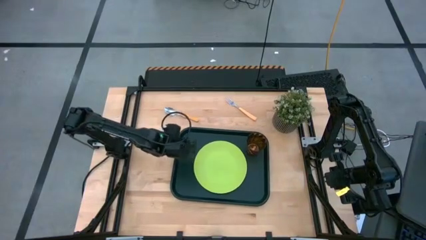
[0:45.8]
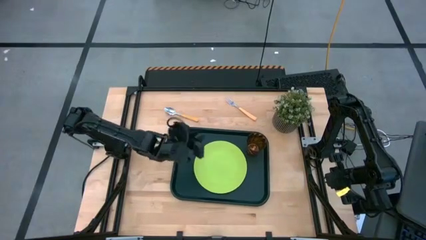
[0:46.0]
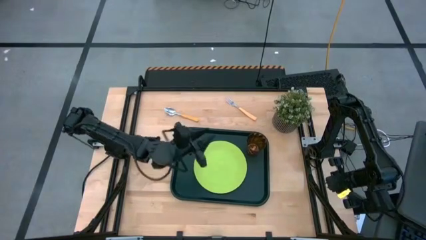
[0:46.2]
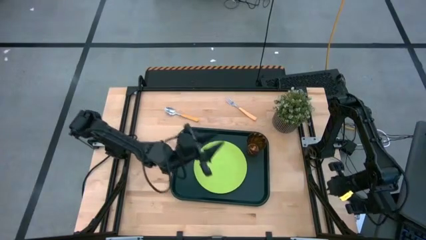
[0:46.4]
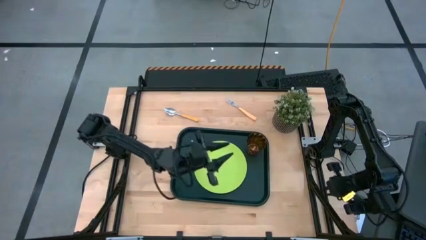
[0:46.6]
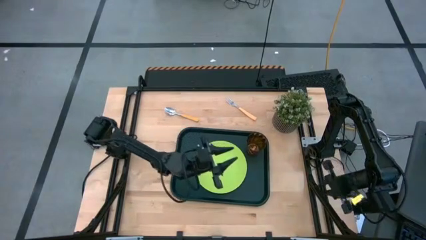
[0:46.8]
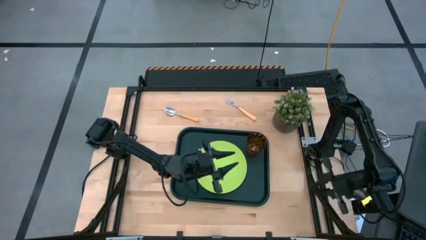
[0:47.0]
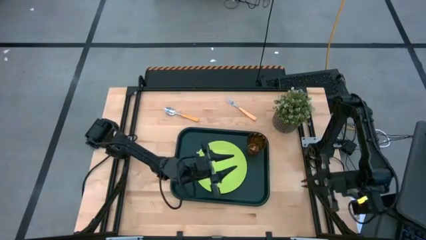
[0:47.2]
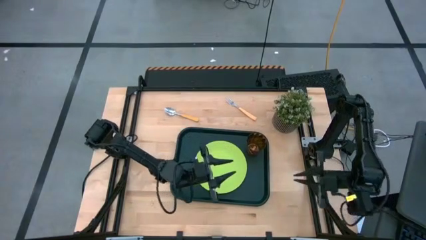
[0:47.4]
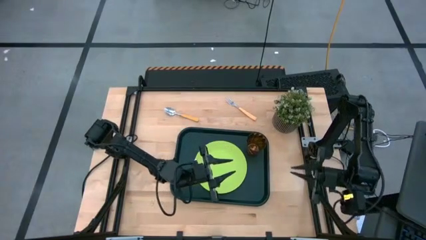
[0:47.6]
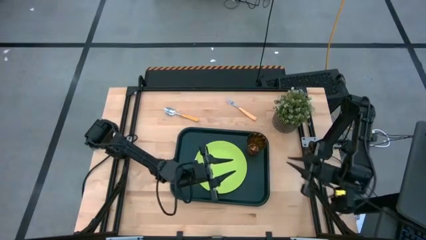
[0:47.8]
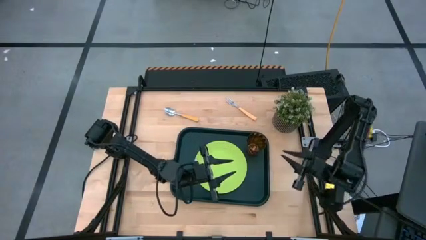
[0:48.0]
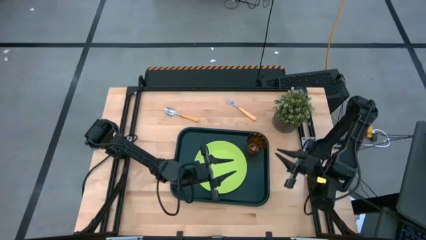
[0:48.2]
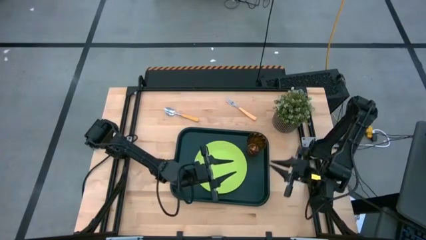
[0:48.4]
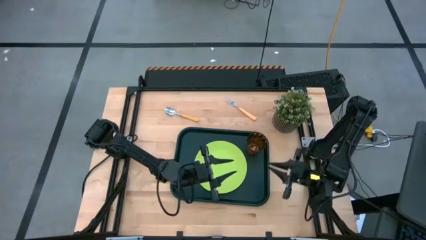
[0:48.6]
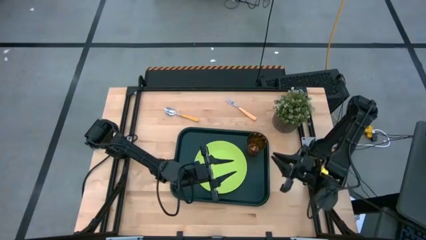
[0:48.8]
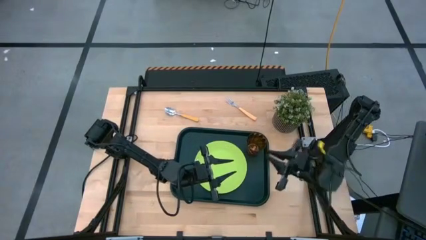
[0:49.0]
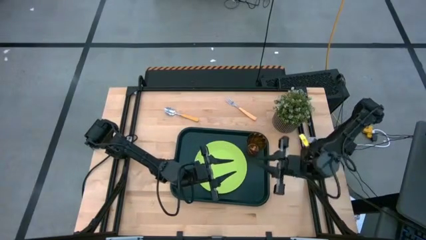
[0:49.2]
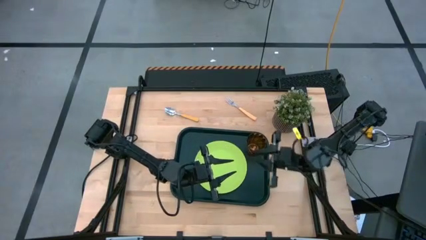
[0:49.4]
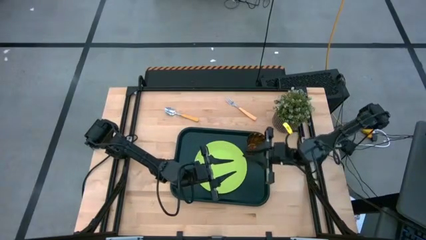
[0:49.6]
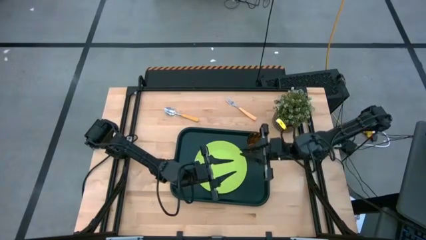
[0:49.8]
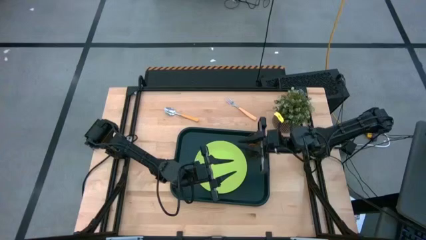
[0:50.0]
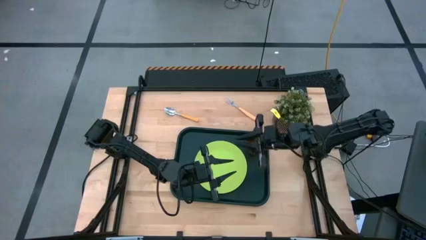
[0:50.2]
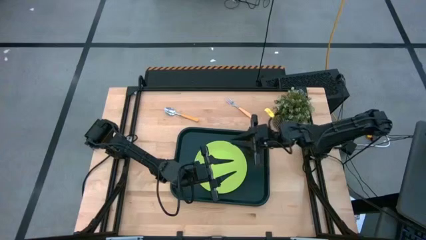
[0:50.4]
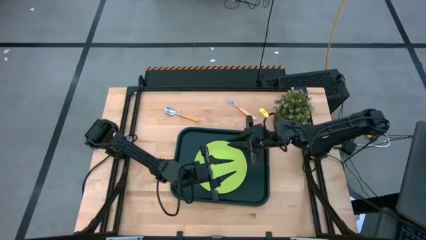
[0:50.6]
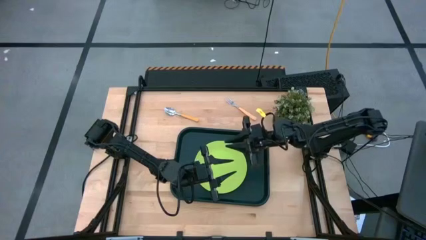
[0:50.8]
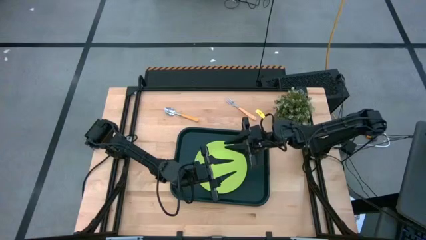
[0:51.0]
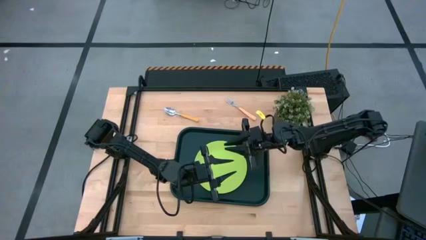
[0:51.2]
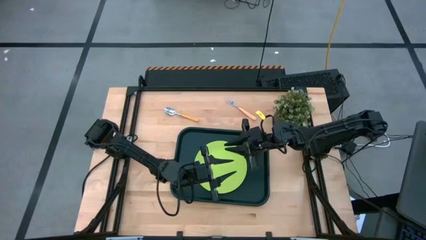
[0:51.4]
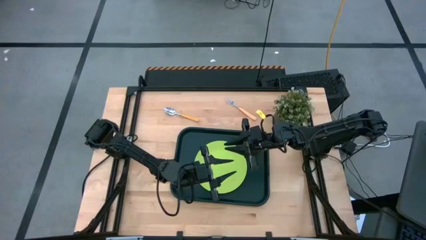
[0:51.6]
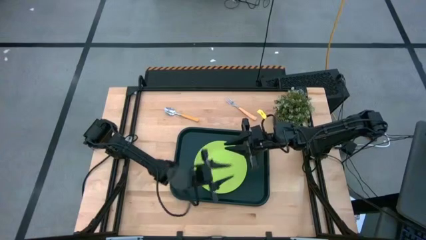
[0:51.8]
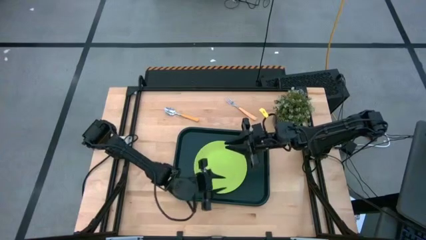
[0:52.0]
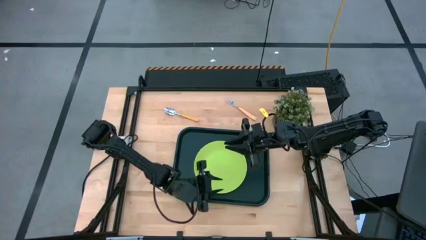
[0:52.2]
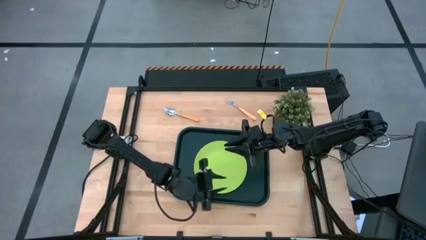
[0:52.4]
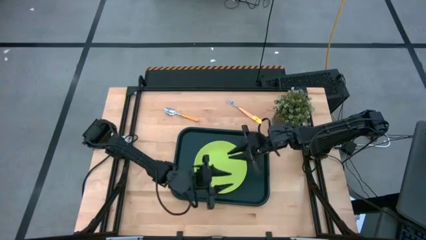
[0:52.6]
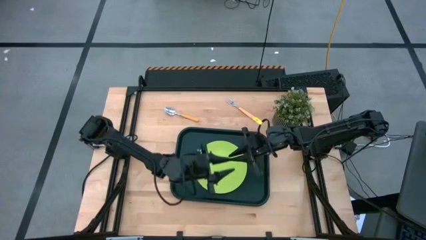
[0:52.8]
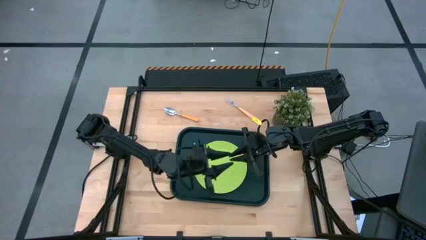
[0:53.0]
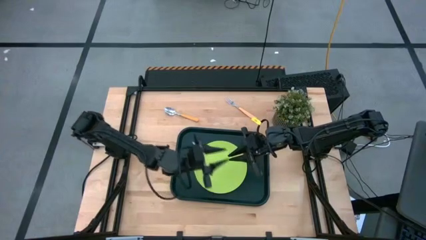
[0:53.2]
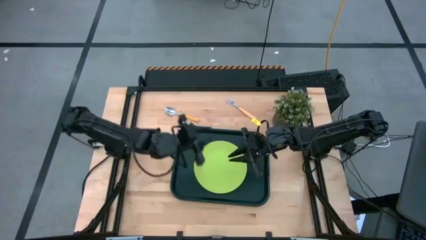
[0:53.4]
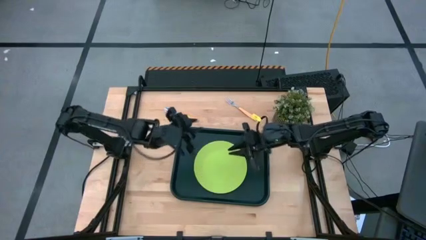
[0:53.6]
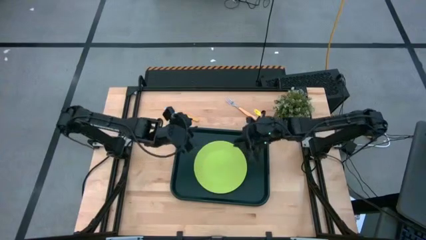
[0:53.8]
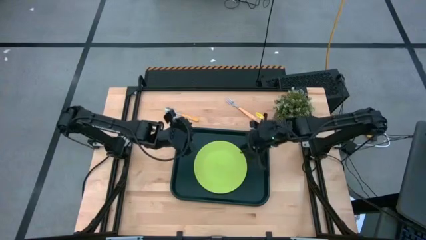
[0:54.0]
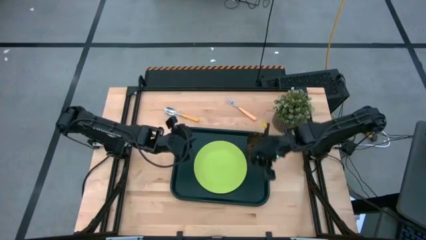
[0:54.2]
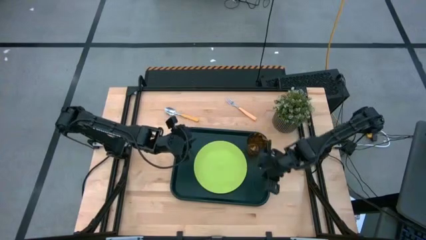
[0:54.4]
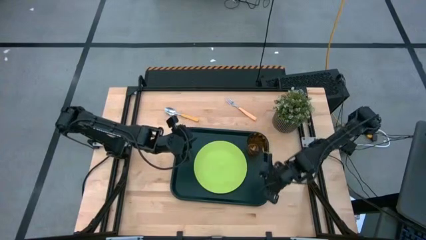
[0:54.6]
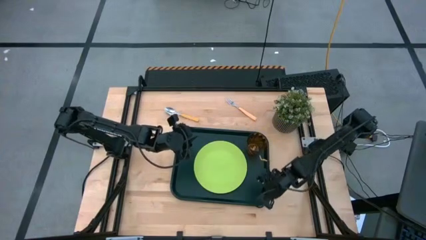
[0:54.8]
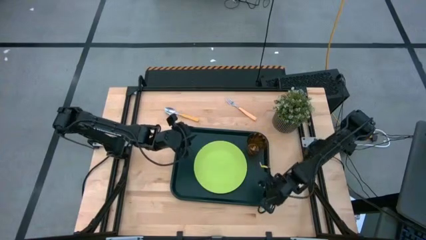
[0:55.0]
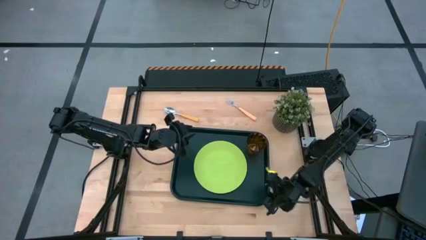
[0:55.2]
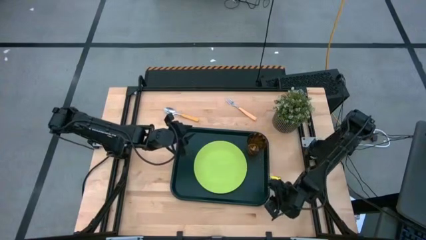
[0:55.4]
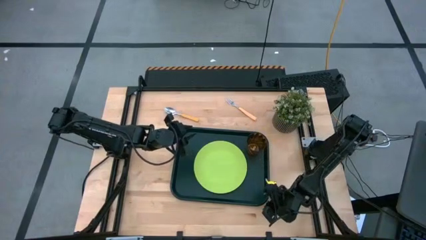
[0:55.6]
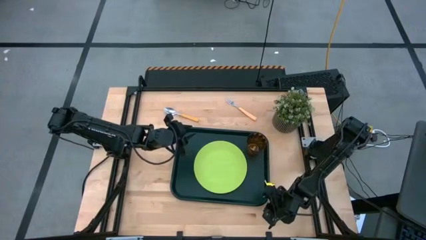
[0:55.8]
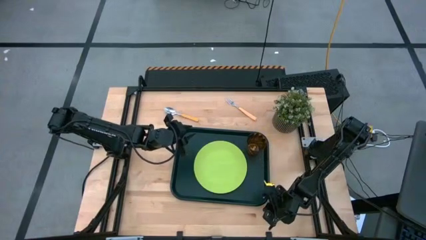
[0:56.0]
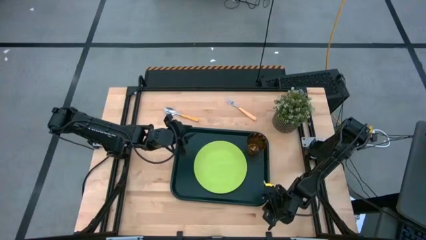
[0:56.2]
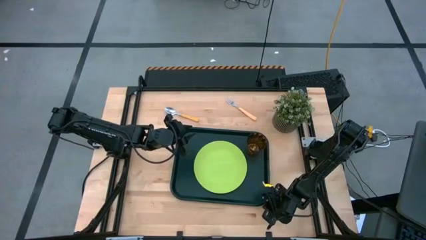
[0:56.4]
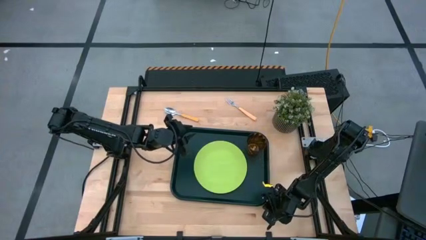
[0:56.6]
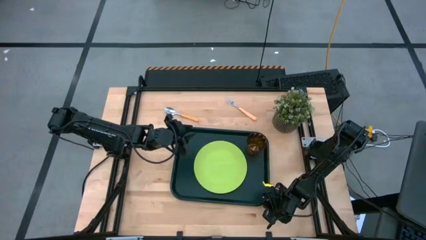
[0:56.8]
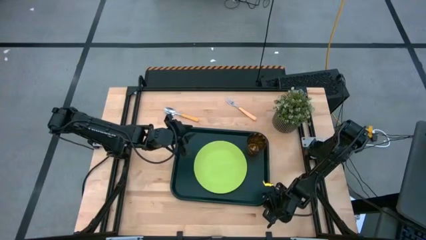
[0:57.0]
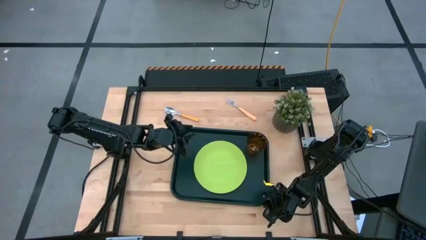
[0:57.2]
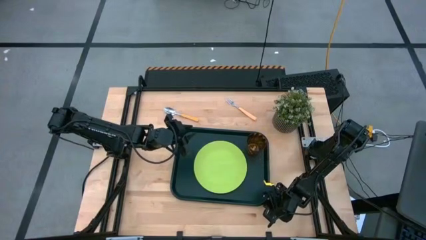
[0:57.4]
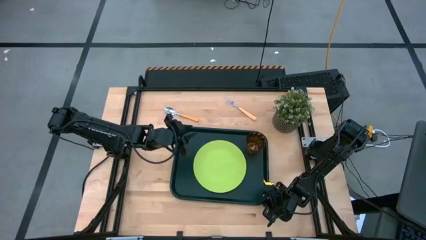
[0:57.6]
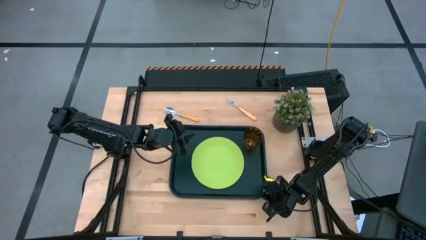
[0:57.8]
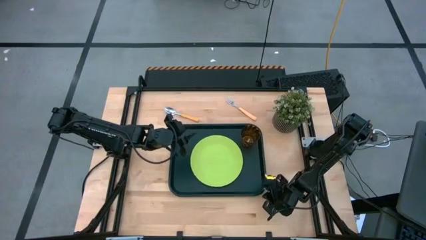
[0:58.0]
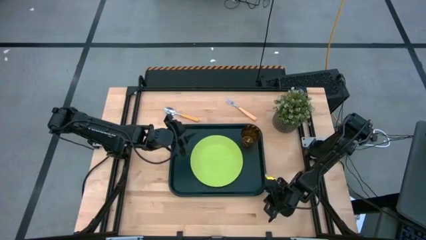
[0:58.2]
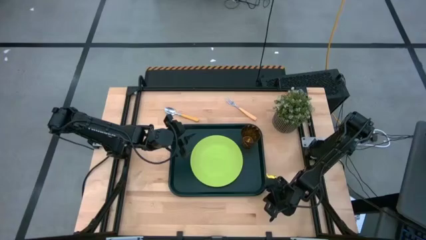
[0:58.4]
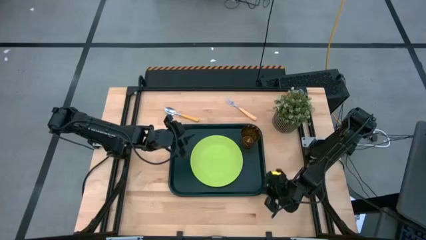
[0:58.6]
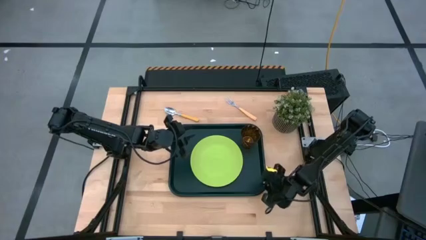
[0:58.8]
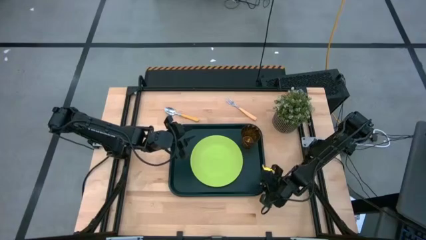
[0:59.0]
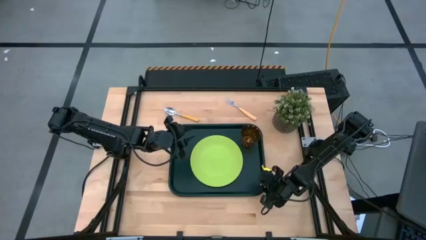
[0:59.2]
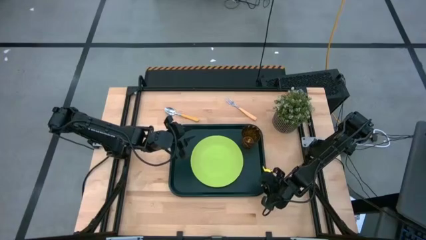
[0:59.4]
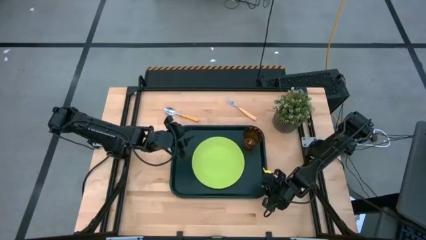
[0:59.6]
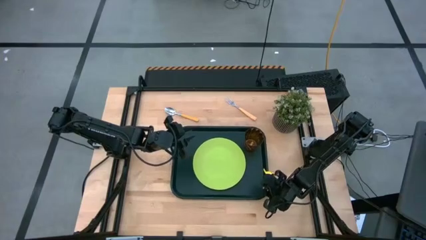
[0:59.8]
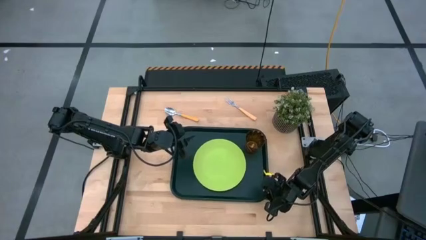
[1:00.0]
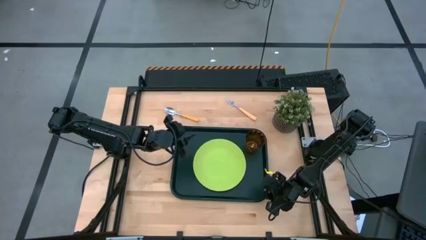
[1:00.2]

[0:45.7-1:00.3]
Task: Pick and place plate/cup/fork/spoon on tray
Adjust the black tray on the table
